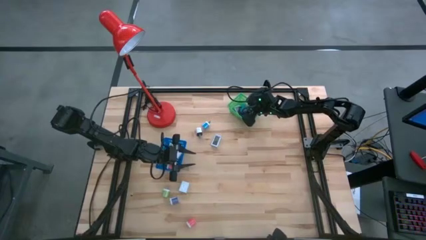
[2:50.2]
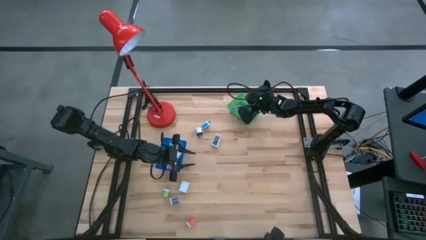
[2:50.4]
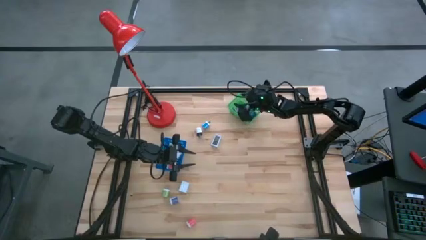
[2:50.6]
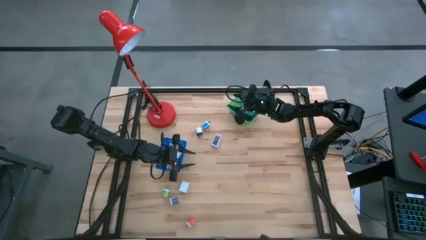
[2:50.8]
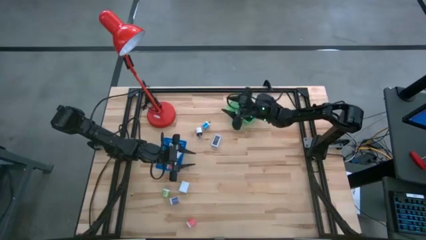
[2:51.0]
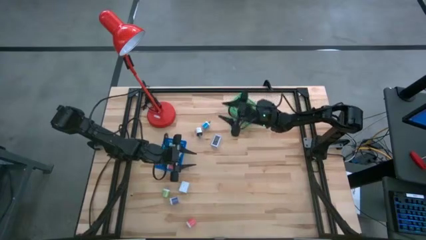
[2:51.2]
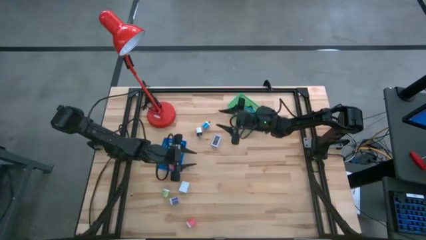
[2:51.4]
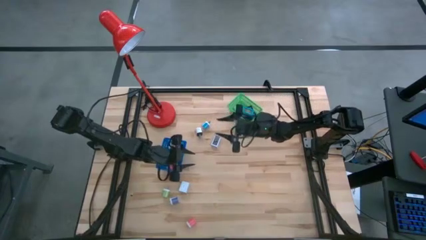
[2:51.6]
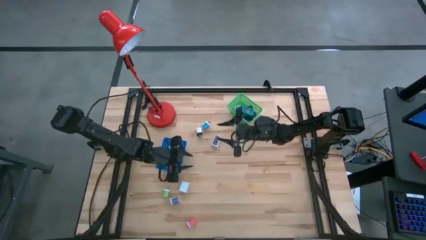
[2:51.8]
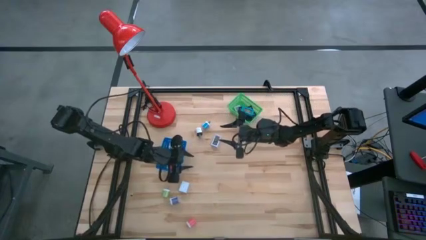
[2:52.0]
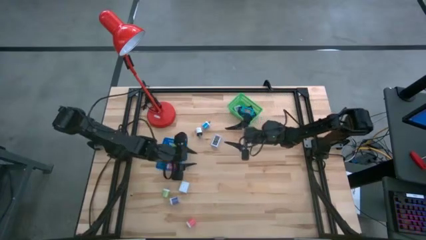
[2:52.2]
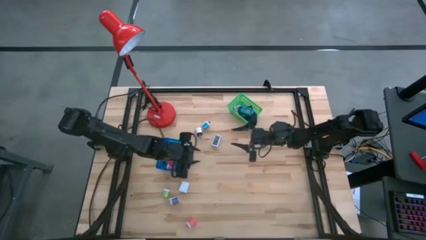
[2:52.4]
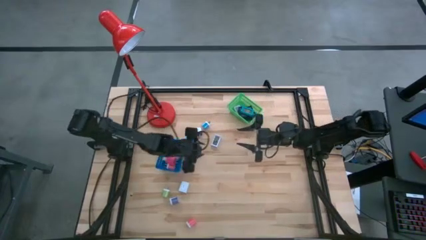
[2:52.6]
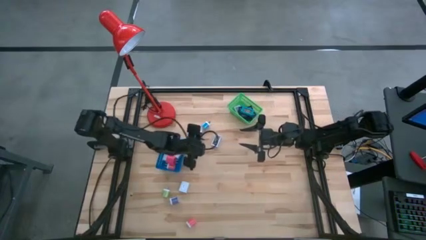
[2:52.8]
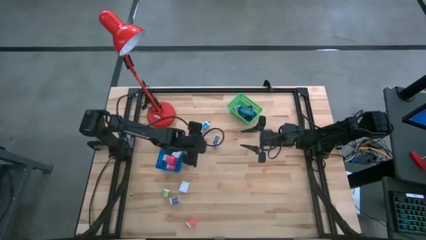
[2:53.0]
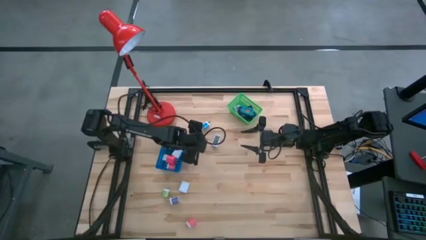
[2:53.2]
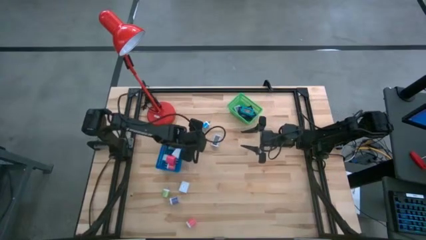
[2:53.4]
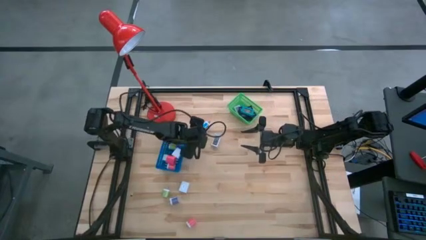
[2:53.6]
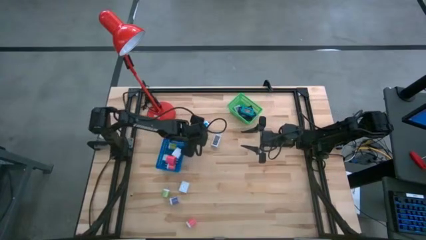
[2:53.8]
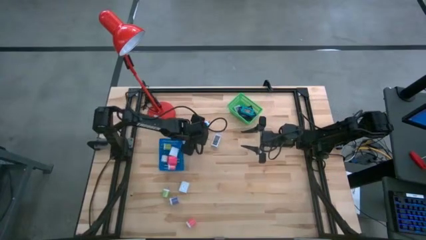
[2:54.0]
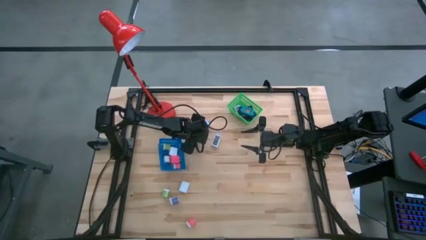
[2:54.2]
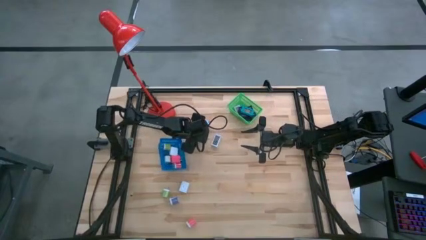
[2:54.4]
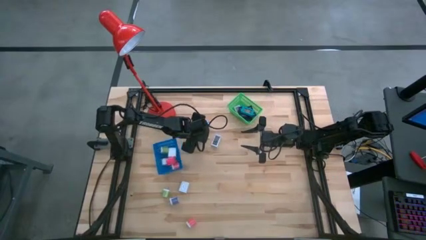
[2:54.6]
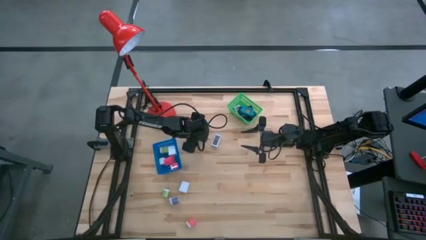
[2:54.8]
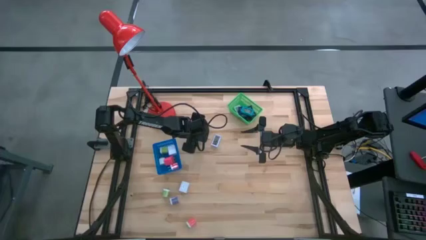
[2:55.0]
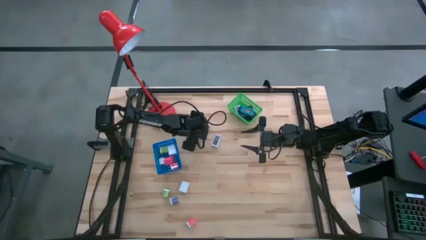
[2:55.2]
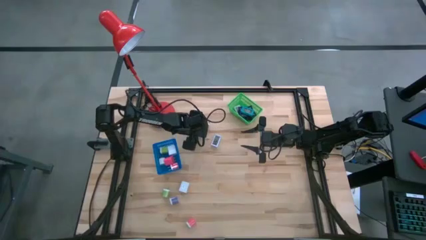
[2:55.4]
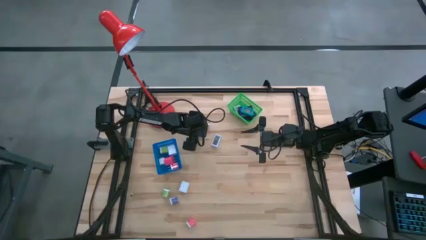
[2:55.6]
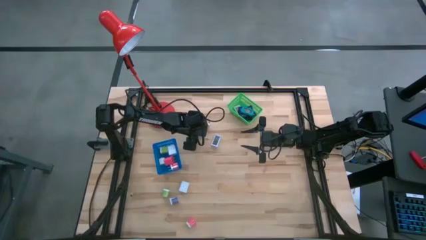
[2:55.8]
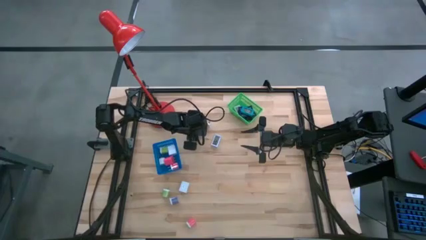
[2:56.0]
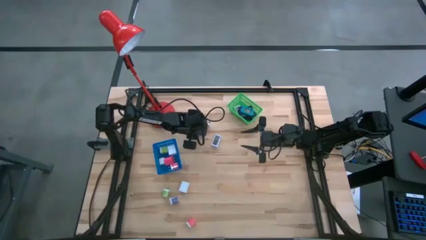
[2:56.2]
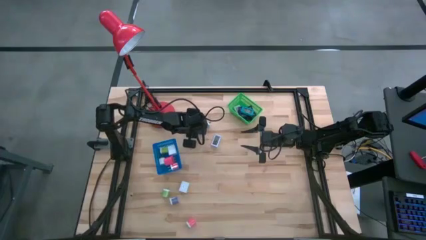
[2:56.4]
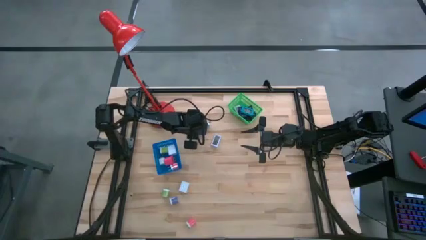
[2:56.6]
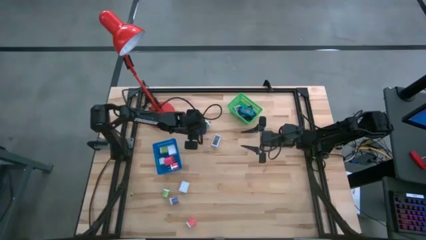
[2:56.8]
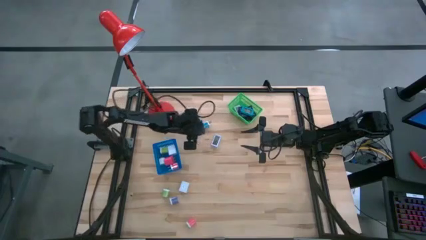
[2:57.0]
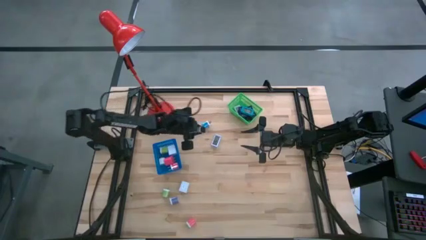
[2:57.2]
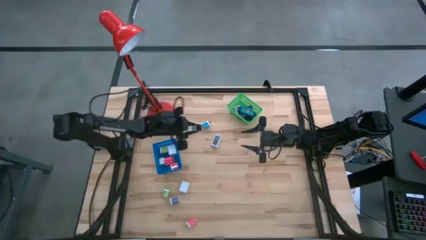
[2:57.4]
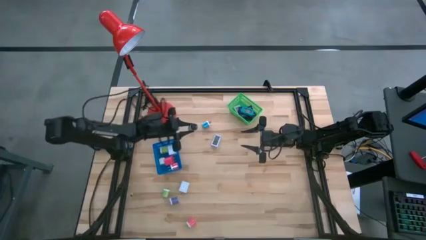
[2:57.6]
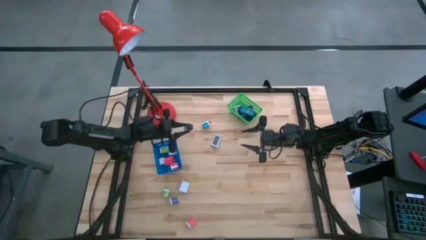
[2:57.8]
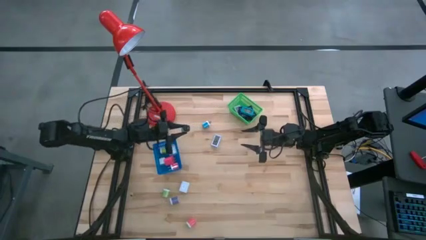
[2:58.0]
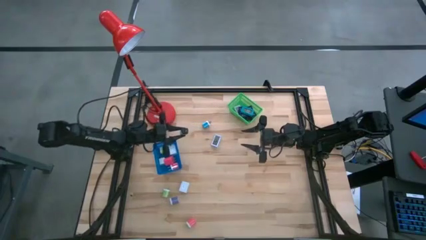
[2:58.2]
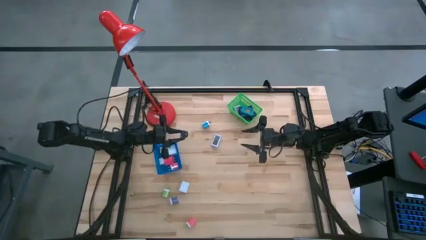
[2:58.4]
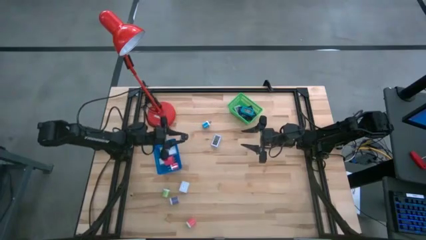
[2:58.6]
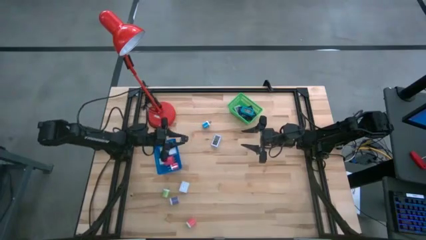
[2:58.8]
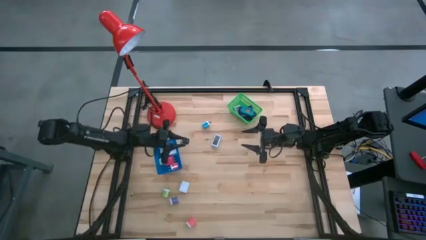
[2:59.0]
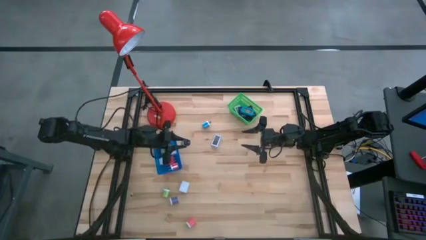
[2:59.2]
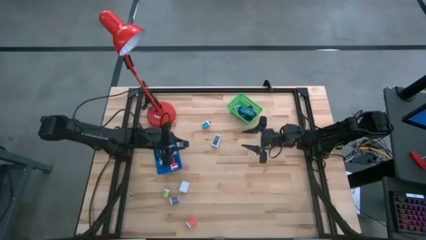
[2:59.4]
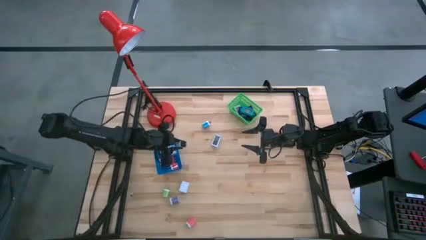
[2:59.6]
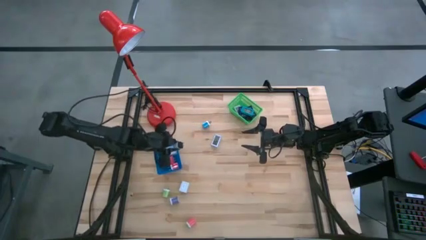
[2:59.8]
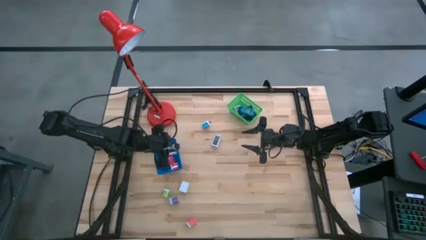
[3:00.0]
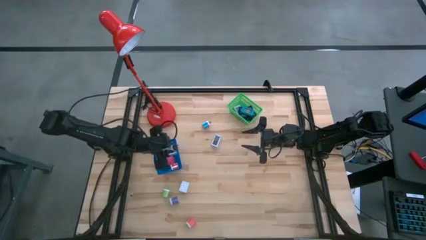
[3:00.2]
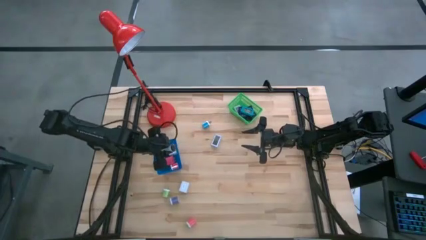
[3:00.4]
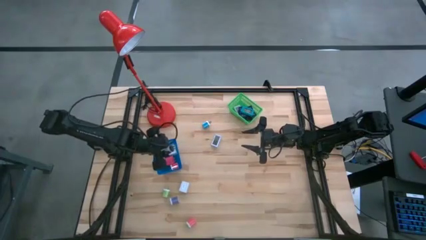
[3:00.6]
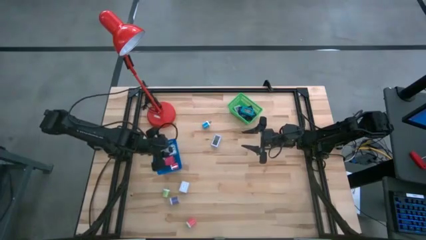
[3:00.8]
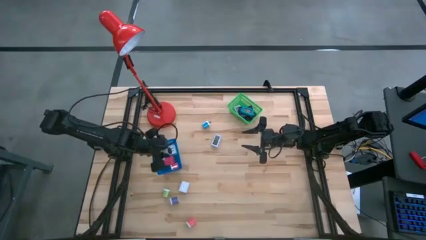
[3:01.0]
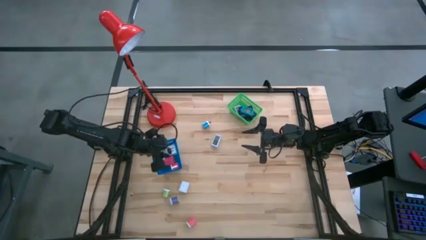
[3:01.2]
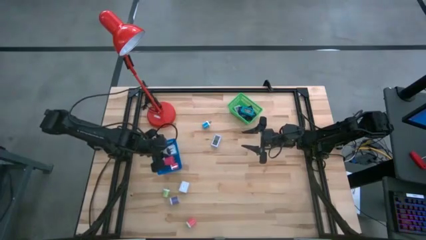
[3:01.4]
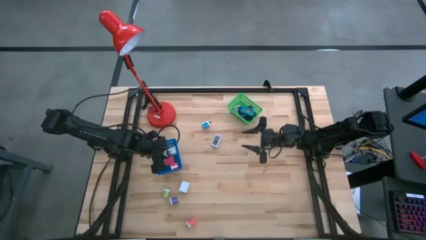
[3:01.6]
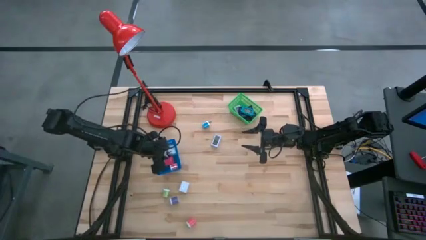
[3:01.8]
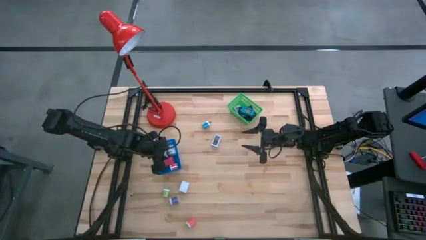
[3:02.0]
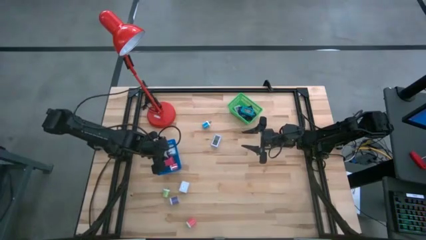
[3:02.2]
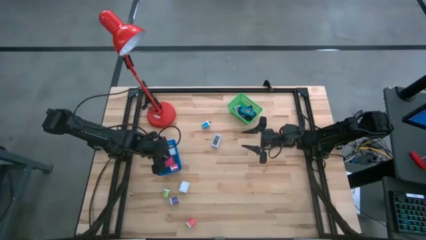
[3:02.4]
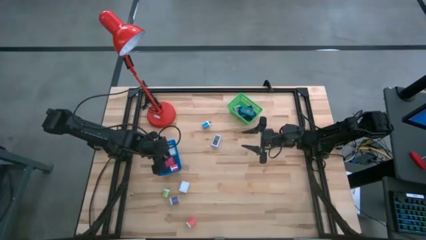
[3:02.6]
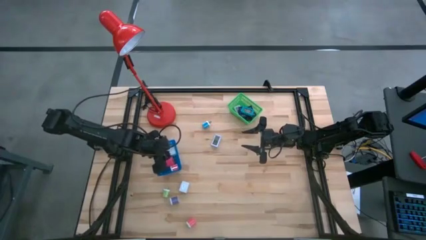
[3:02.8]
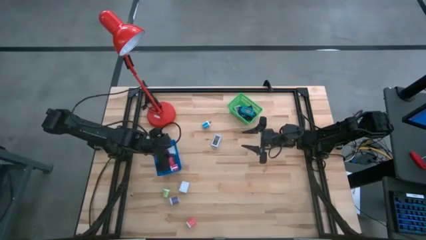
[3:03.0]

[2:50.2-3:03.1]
Task: Pick & Place Office items
Put the white black charger adapter into the blue basket
